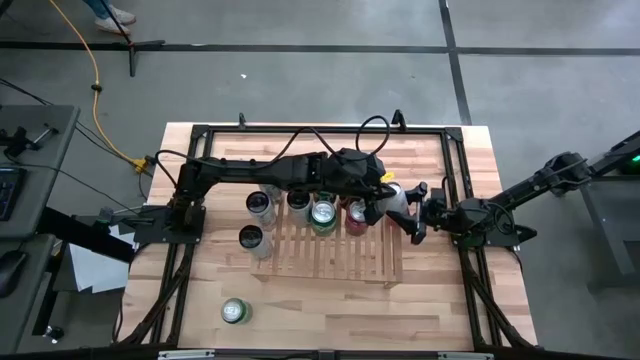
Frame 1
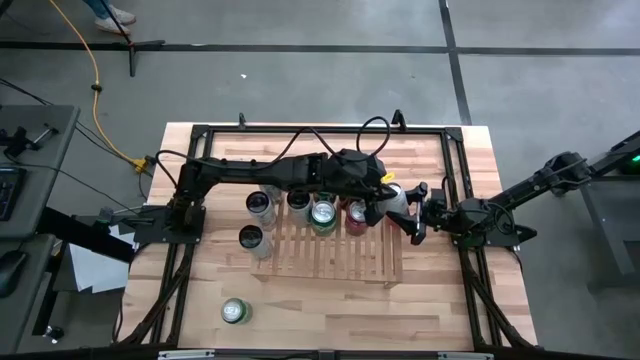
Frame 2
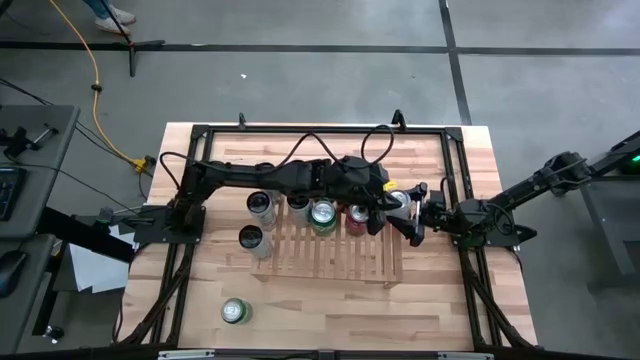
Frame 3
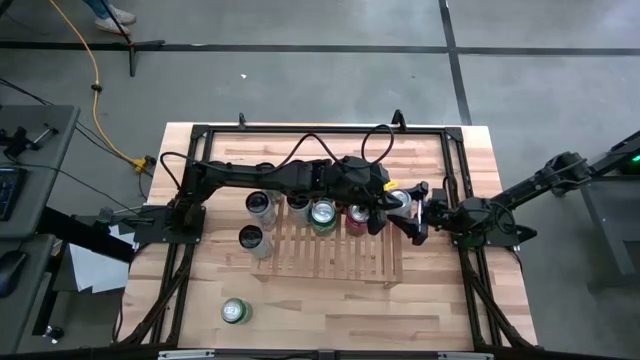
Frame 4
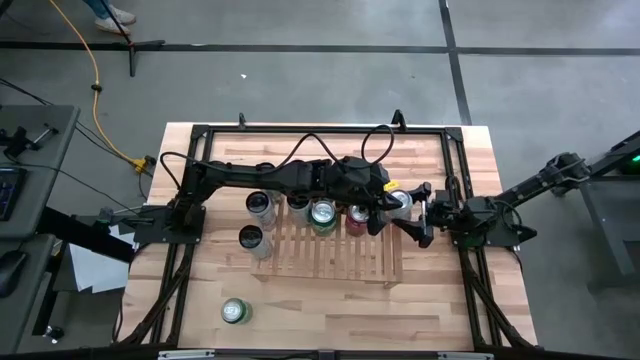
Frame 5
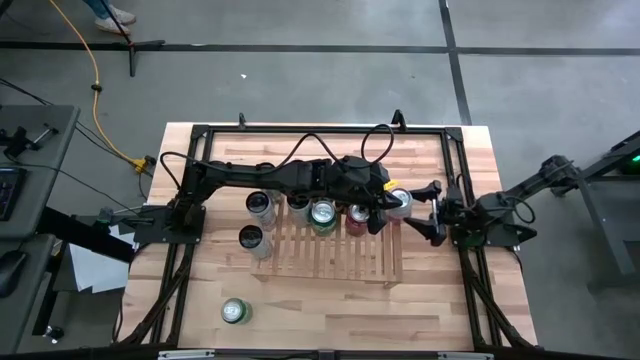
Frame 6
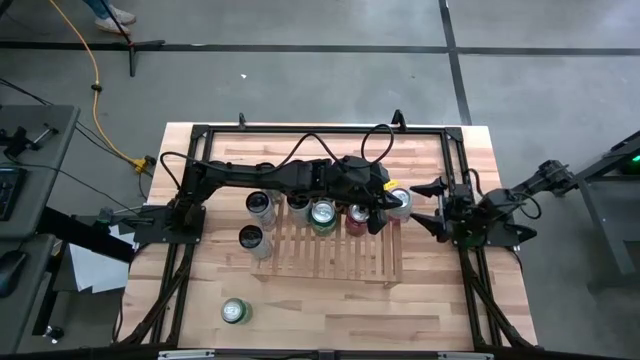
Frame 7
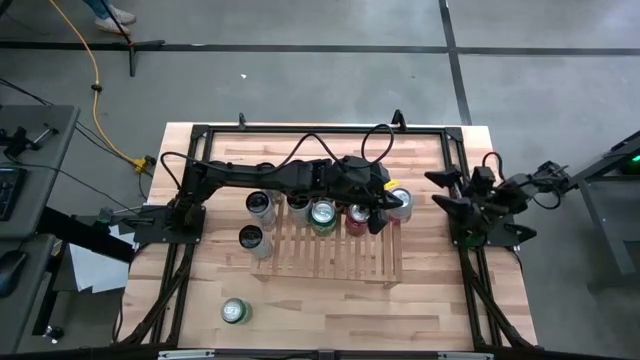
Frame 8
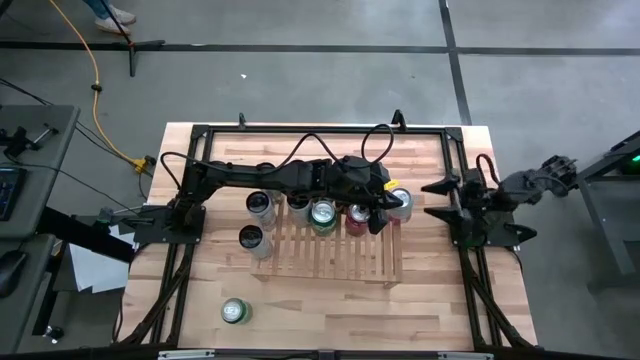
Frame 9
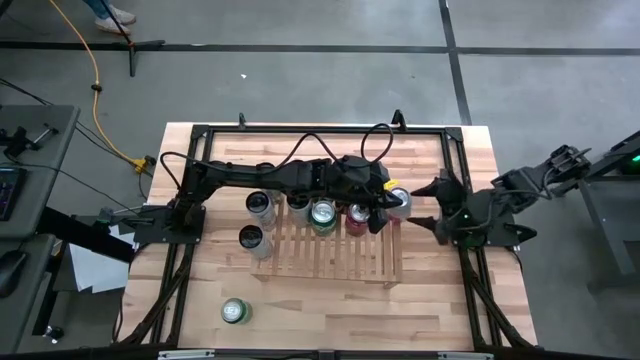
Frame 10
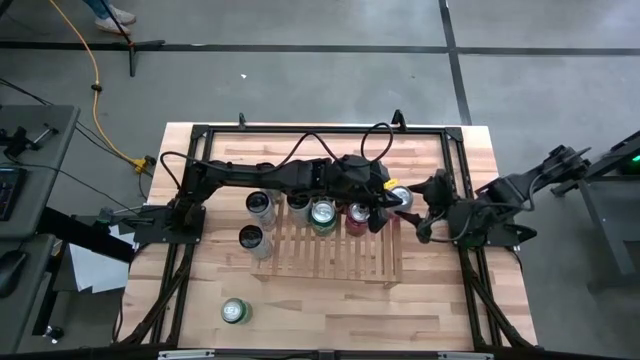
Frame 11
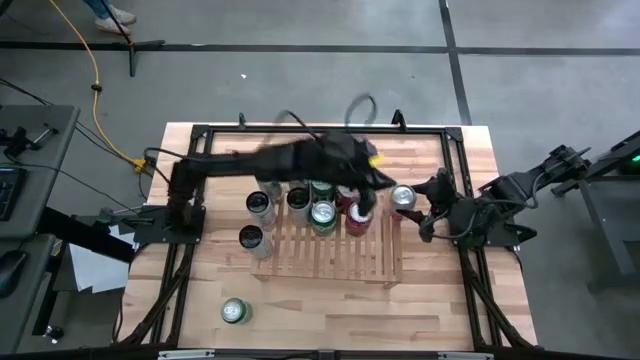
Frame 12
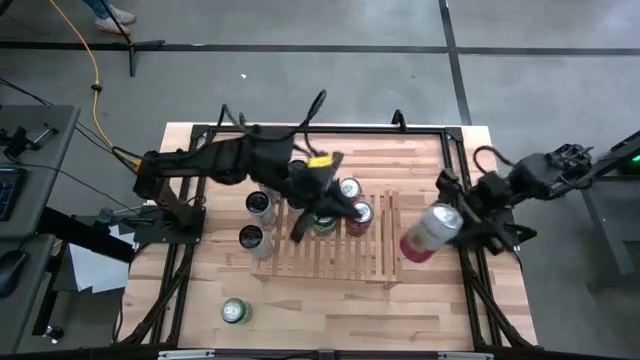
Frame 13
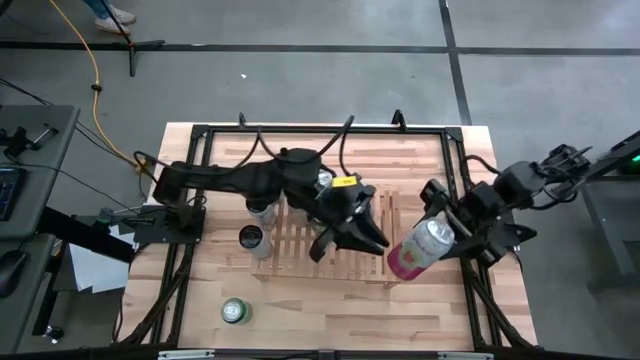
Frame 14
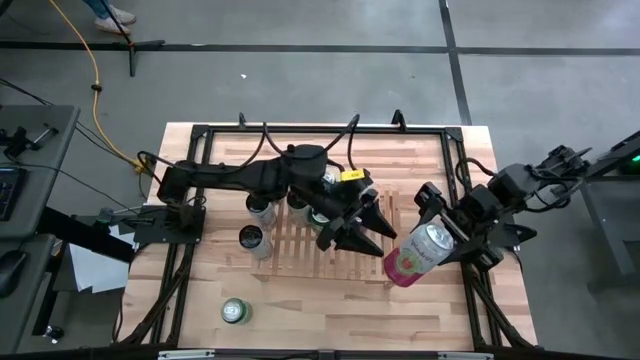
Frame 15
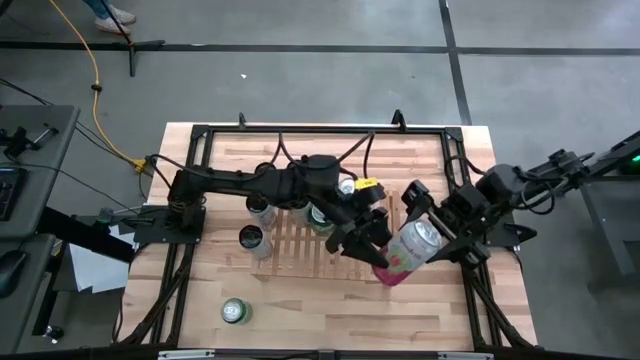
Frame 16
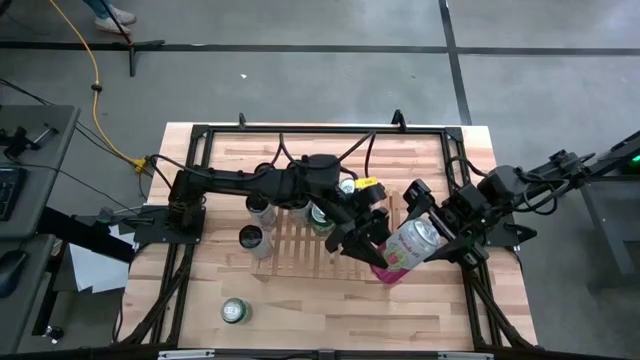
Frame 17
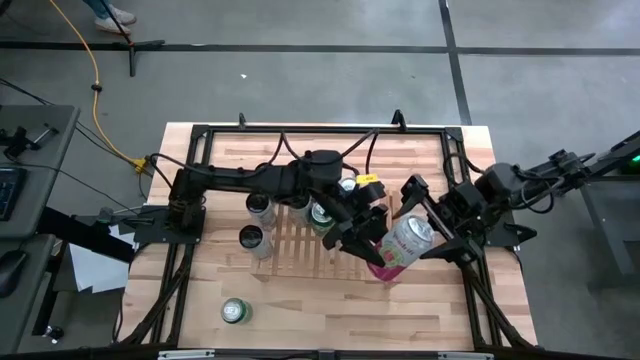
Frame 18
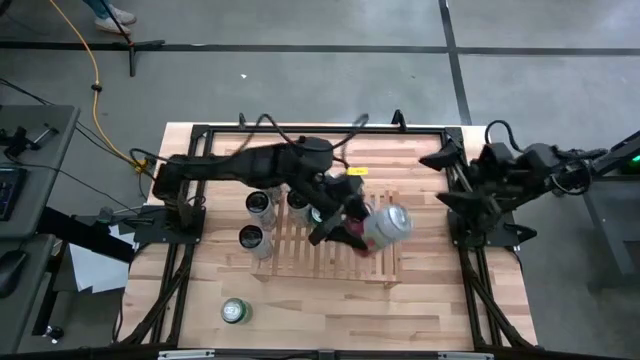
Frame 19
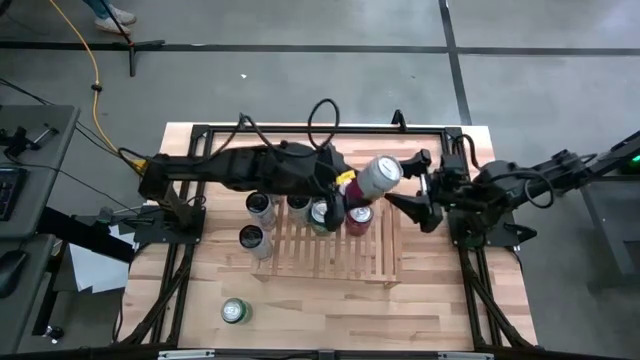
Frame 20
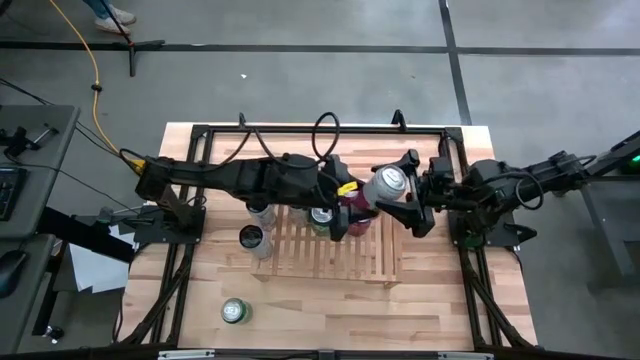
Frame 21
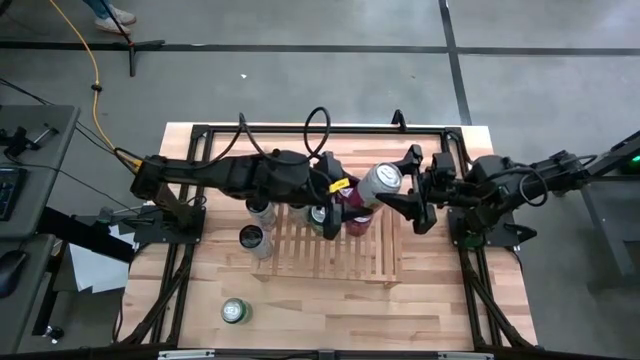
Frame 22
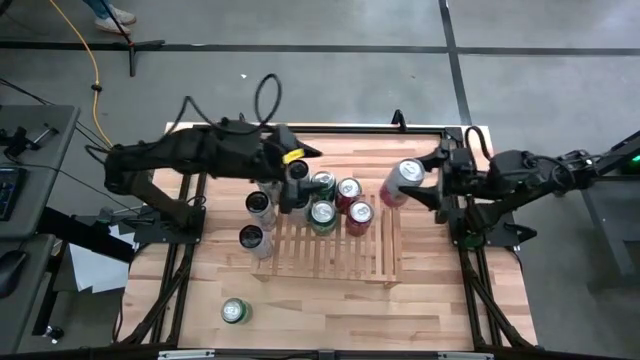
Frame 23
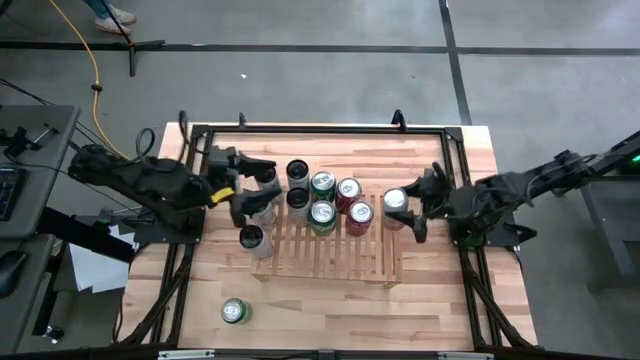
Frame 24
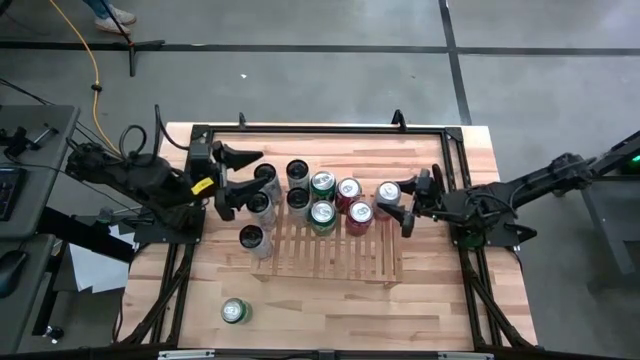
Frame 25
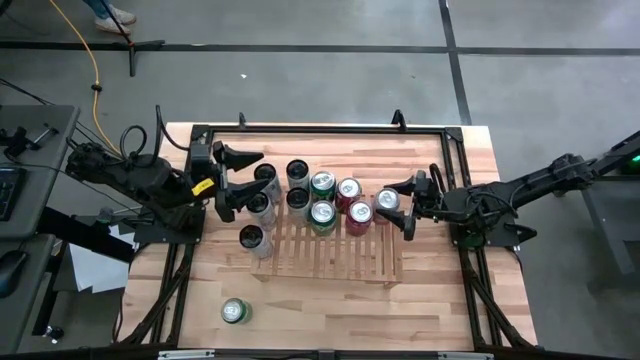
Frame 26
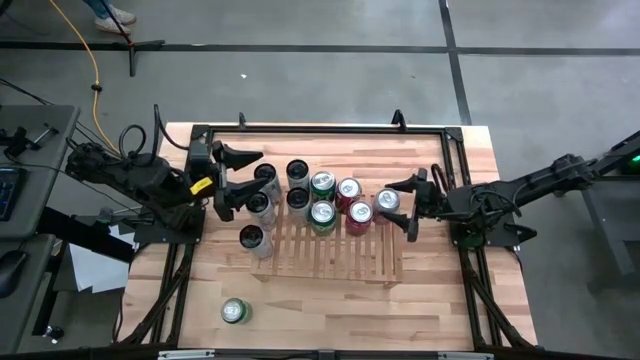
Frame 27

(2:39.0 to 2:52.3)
Task: Place canned beverage on shelf
Put the pink white soda can on the shelf

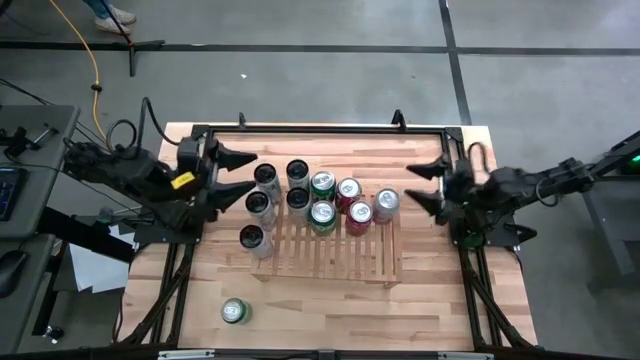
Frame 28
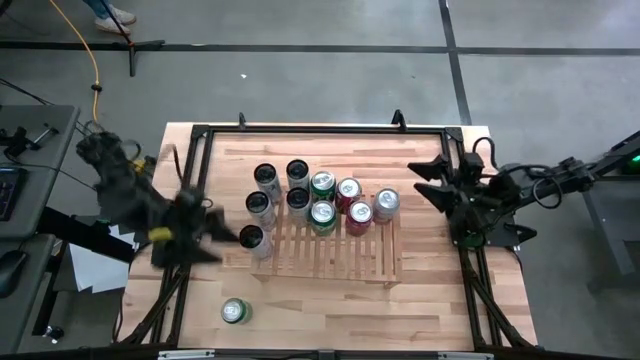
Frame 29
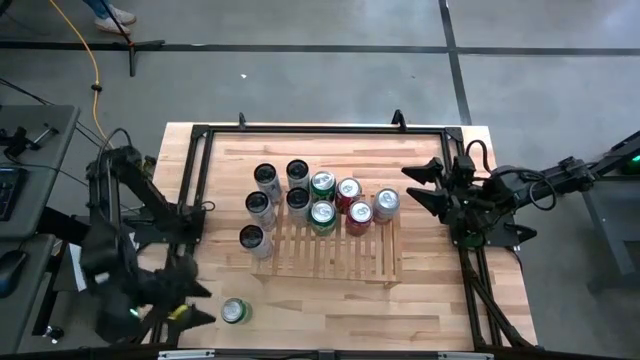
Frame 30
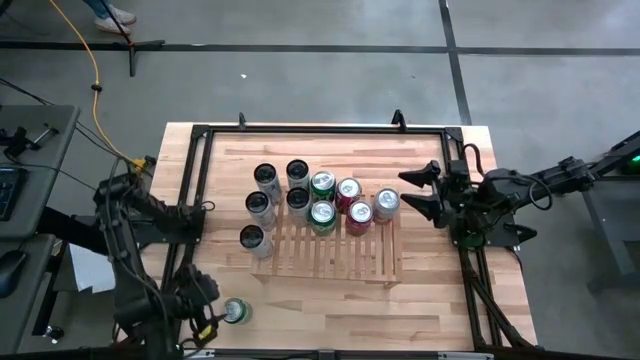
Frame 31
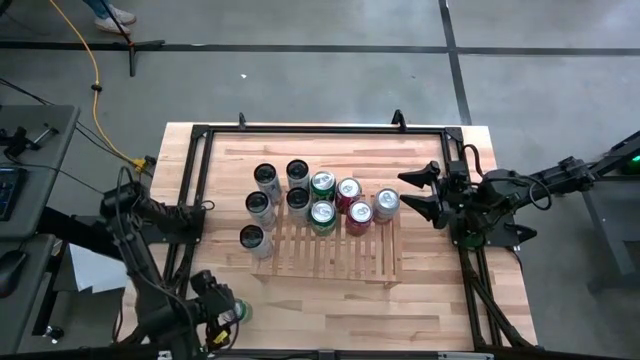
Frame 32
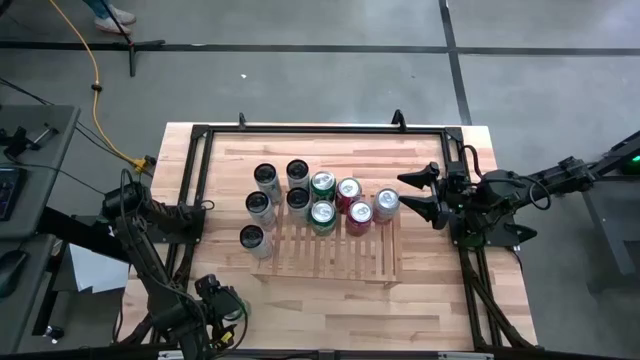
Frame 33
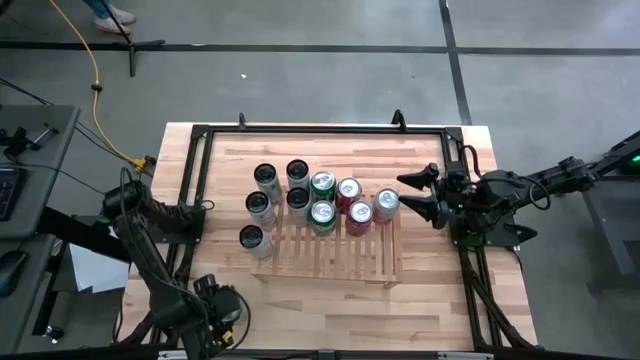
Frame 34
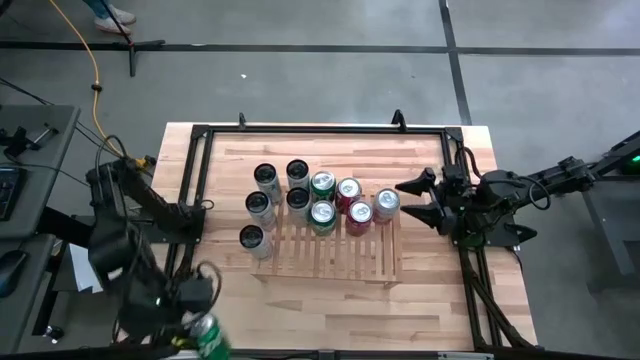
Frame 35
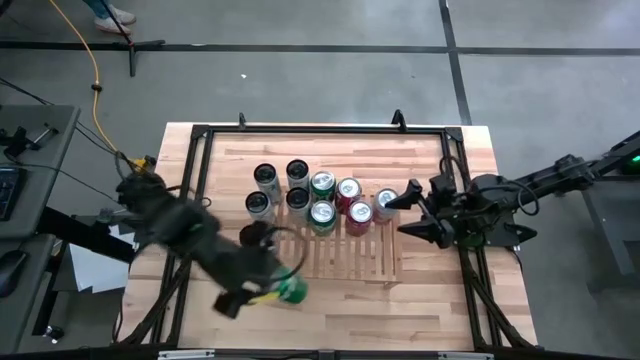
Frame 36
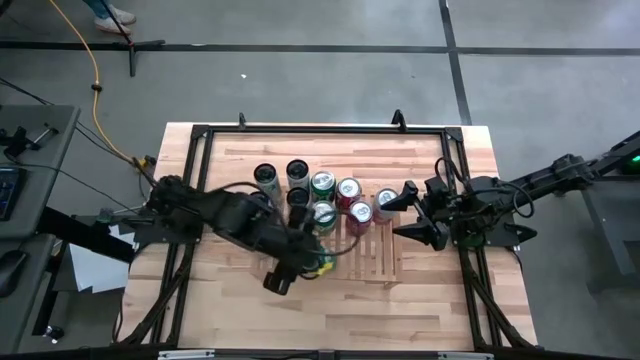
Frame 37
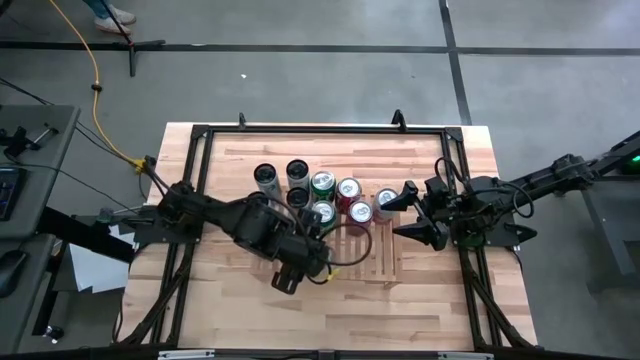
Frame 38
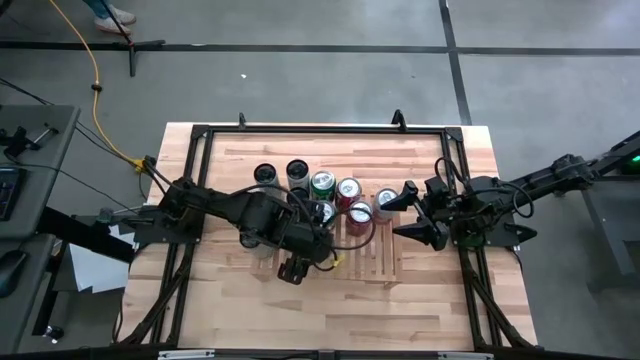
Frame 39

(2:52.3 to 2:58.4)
Put the green soda can aligned with other green soda can on the shelf

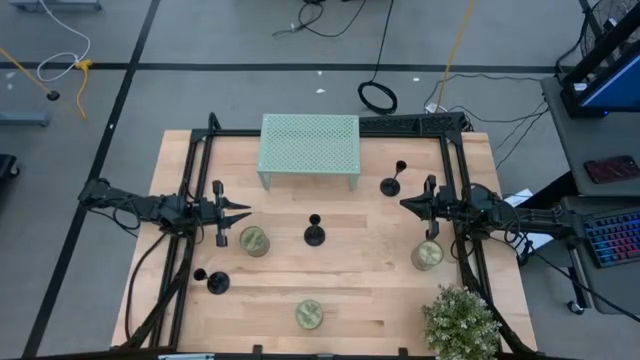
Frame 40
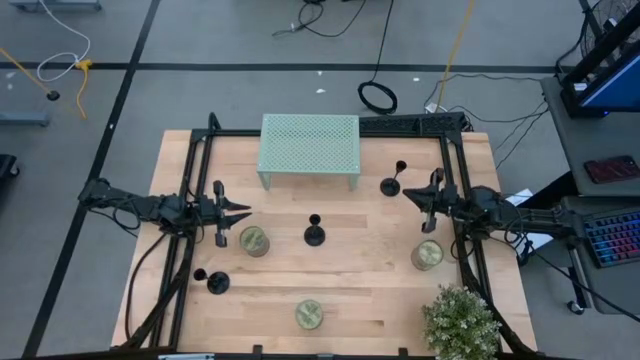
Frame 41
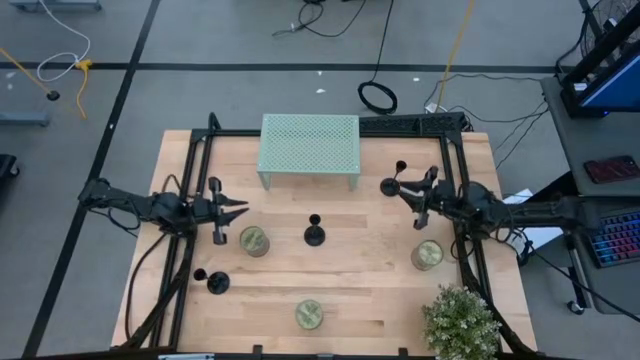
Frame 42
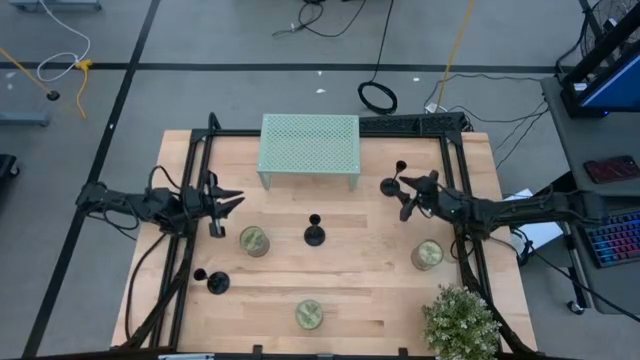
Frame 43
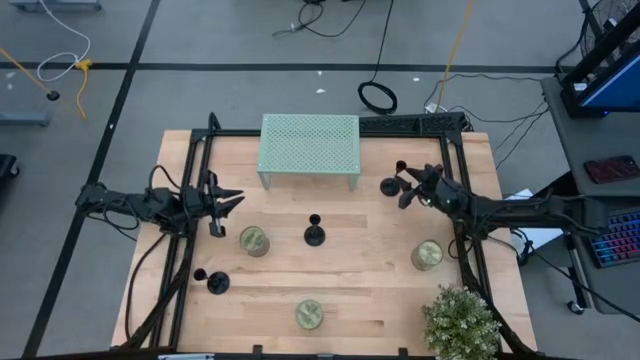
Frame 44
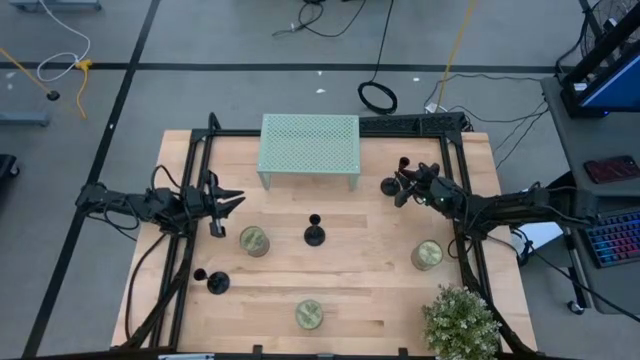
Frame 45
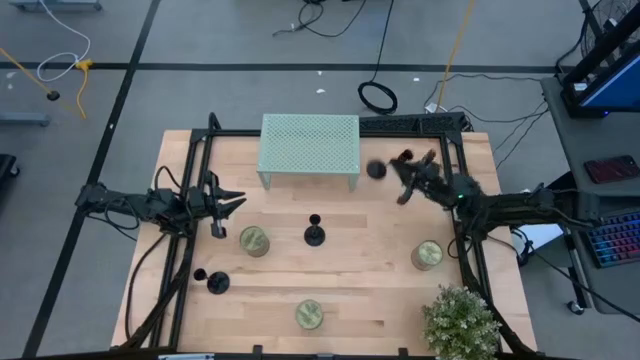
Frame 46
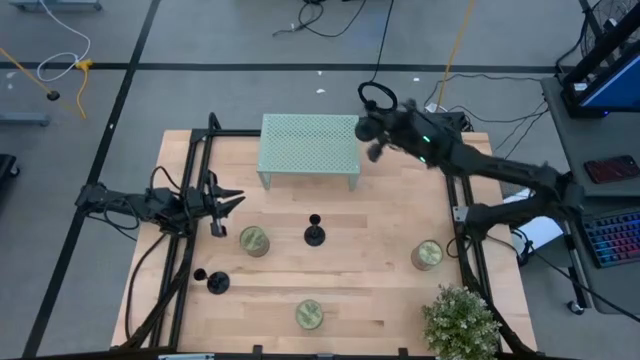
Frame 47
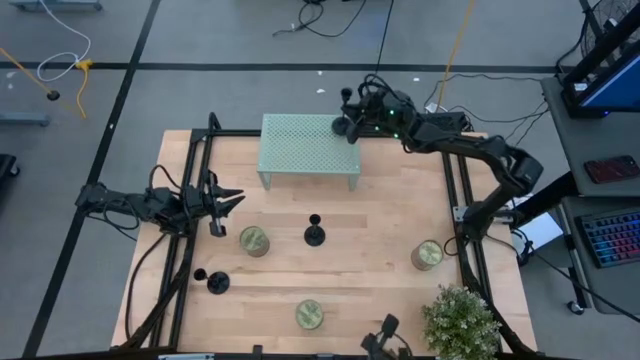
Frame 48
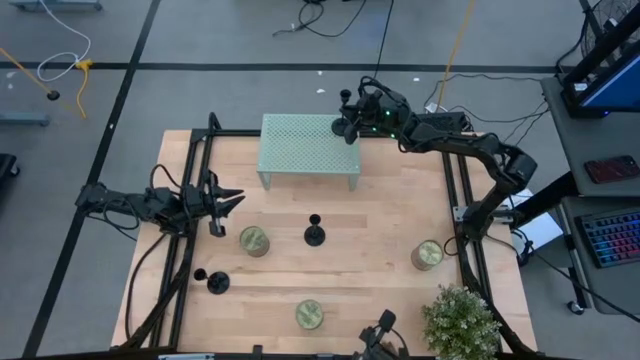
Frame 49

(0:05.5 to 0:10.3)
Task: Pick & Place candle stick holders
Put the black candle holder on the shelf
